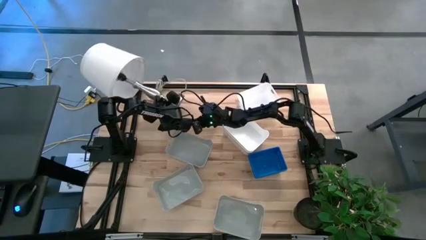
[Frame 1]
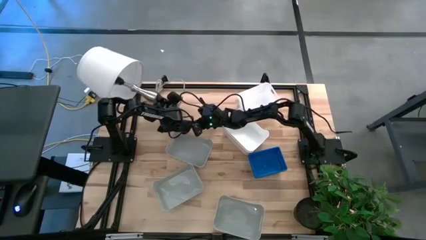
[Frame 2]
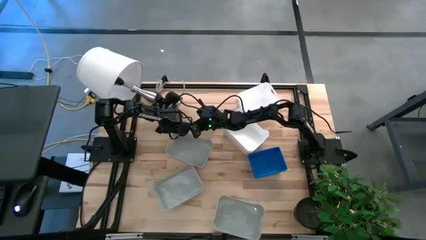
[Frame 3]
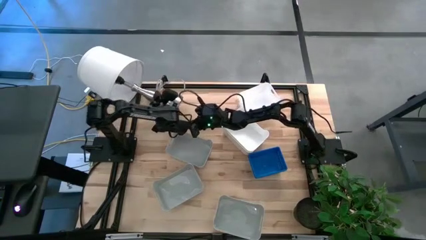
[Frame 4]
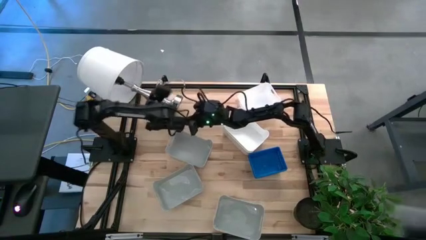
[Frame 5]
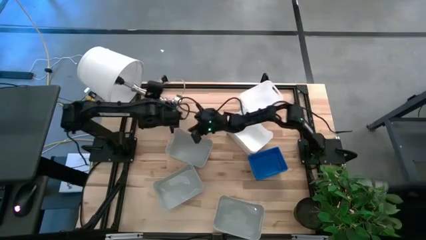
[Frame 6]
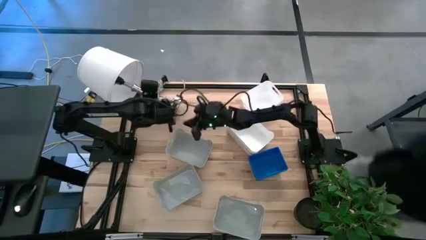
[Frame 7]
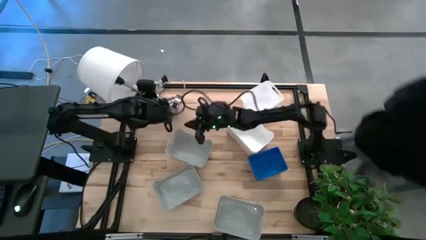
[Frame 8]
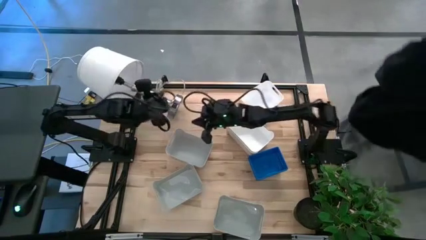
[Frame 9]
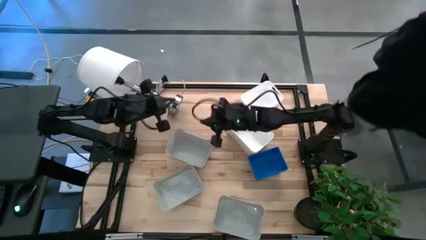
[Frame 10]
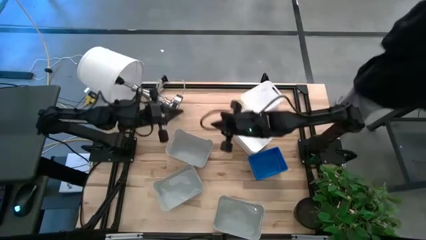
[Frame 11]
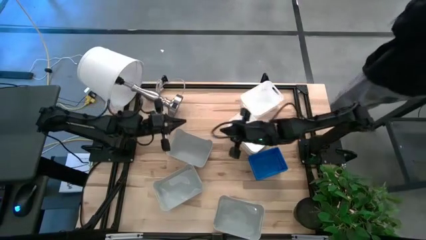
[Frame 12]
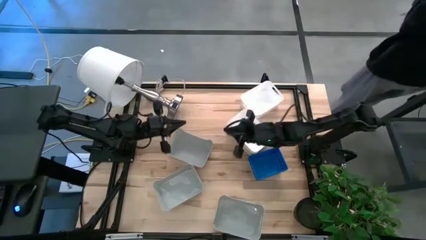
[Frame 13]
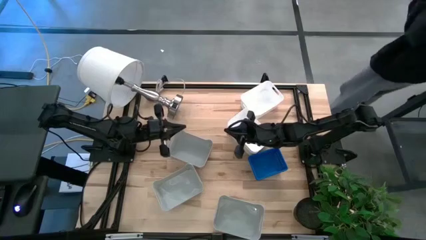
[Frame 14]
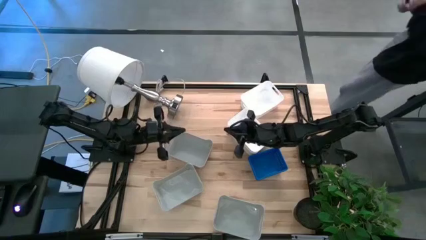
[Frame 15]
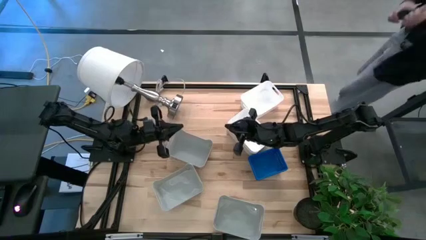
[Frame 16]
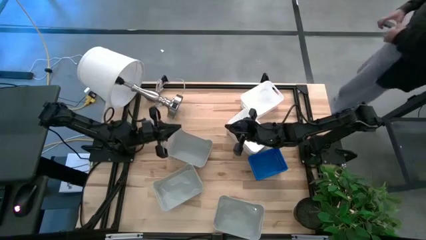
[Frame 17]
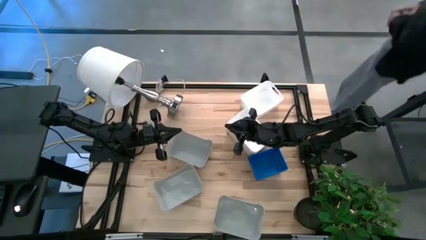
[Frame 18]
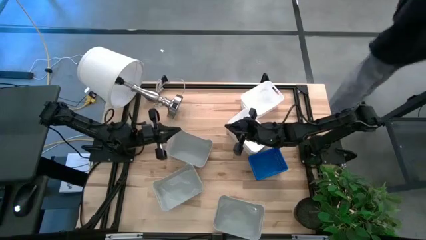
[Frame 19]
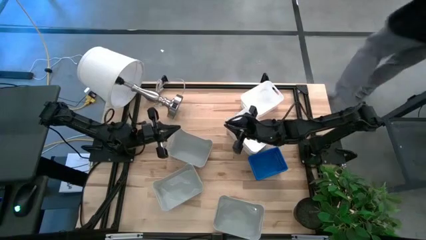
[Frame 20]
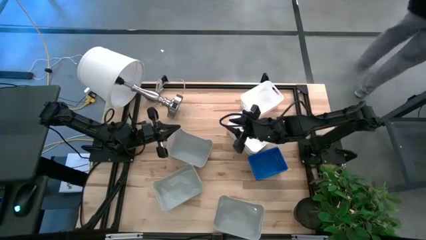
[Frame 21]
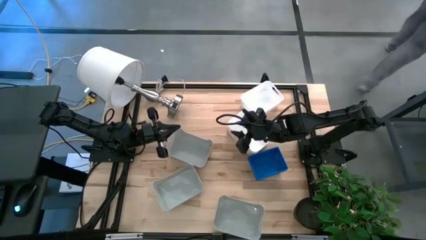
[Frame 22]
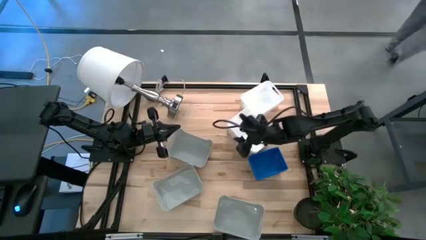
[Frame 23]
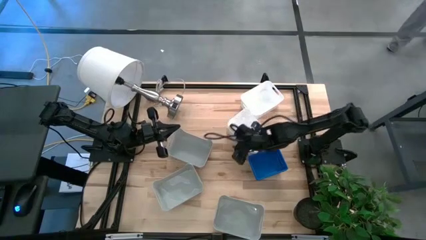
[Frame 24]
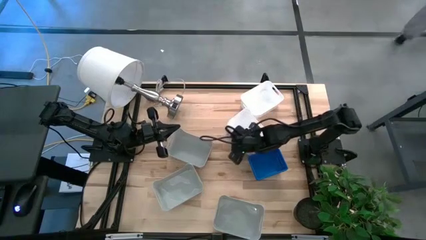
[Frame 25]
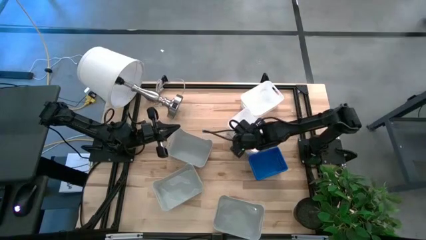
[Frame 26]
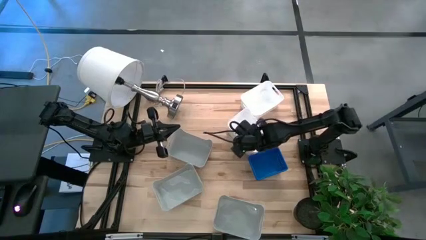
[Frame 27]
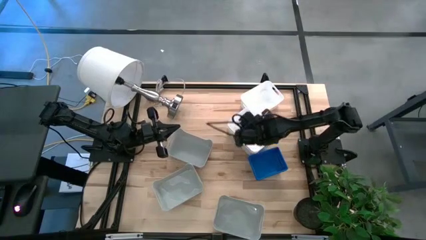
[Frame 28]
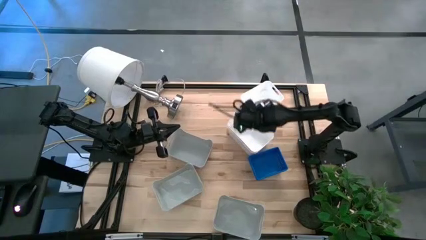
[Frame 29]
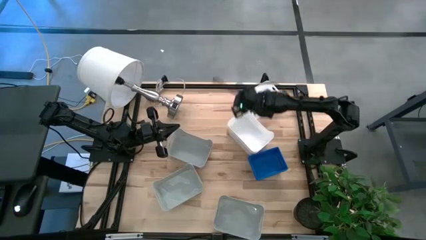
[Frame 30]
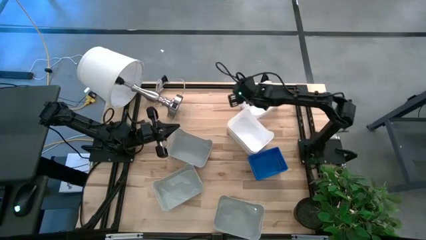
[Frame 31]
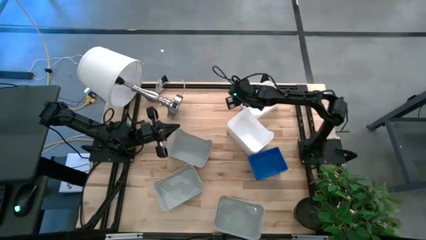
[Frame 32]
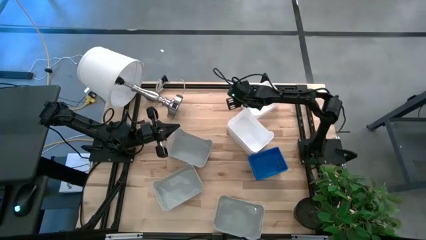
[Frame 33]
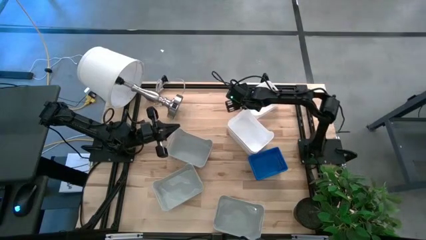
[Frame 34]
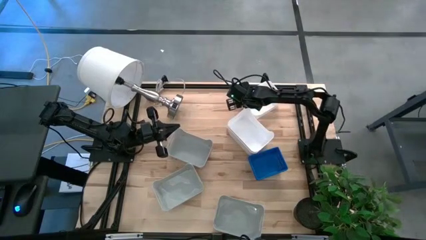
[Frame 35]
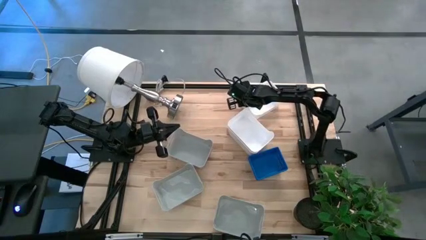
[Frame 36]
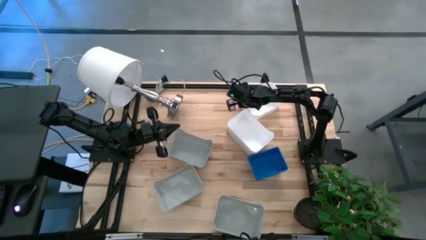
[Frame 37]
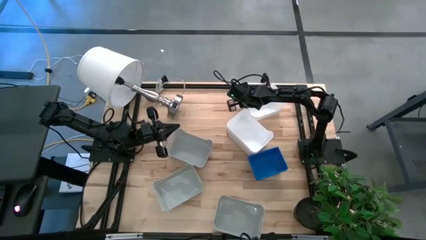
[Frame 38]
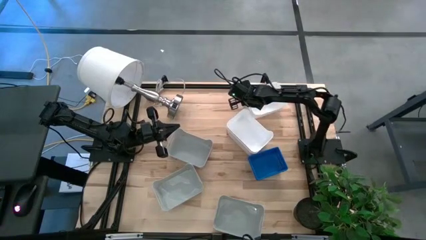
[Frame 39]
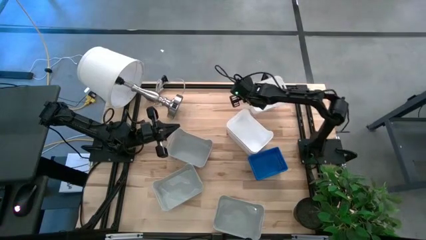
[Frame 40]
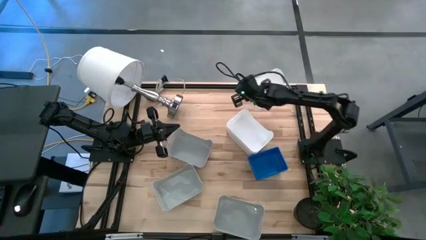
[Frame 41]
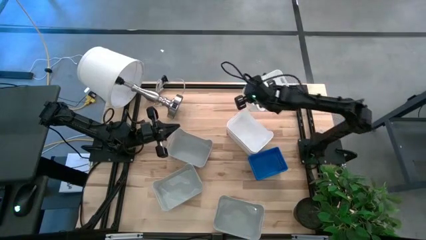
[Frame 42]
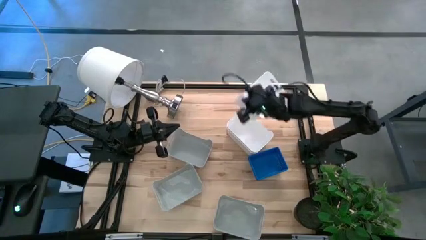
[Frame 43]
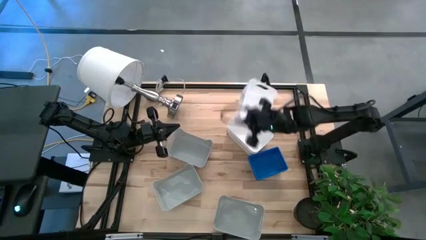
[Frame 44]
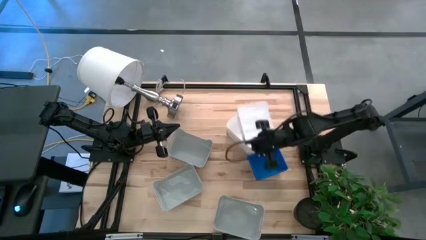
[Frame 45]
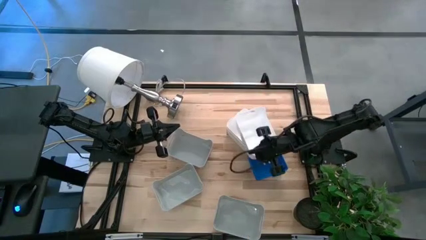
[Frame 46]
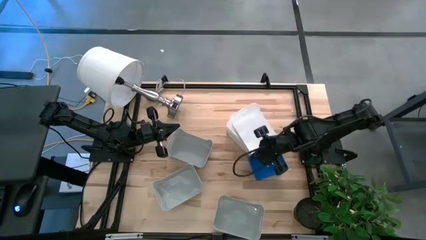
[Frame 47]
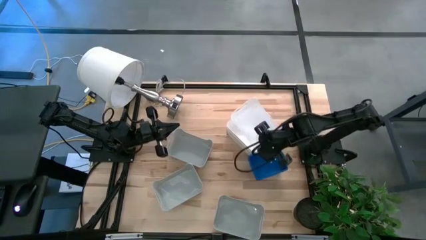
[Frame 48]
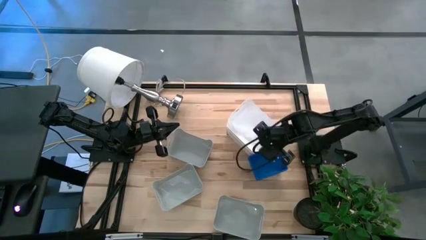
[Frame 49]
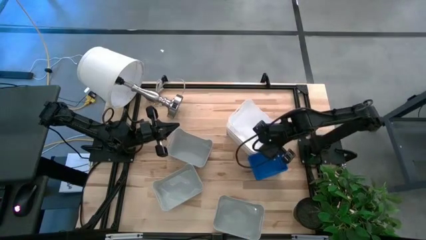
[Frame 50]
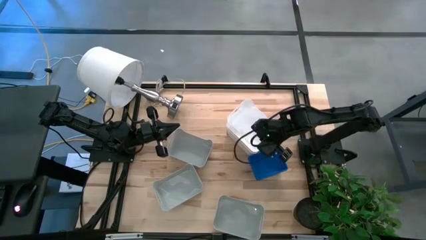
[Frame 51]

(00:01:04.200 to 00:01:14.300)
Stack the top white bin on top of the white bin
